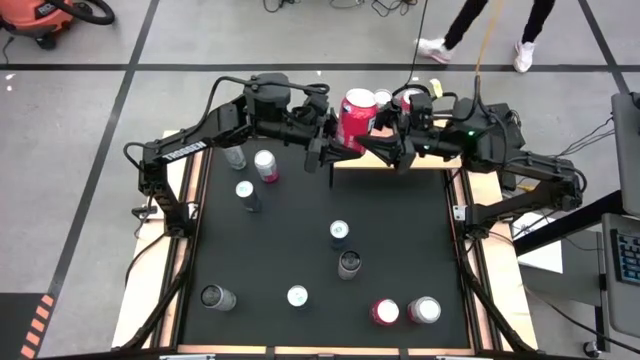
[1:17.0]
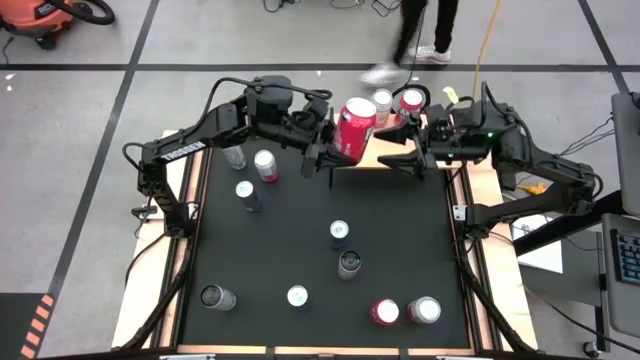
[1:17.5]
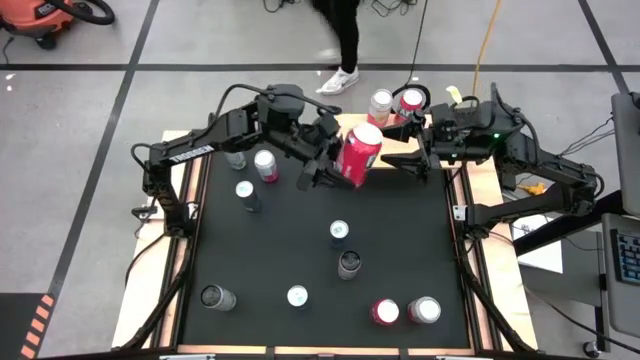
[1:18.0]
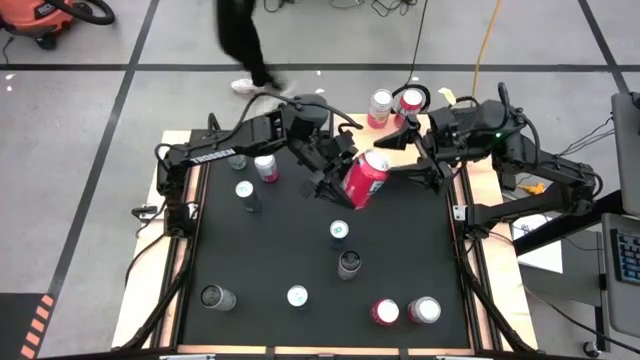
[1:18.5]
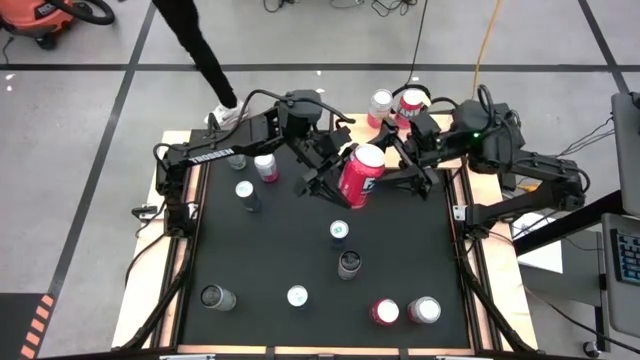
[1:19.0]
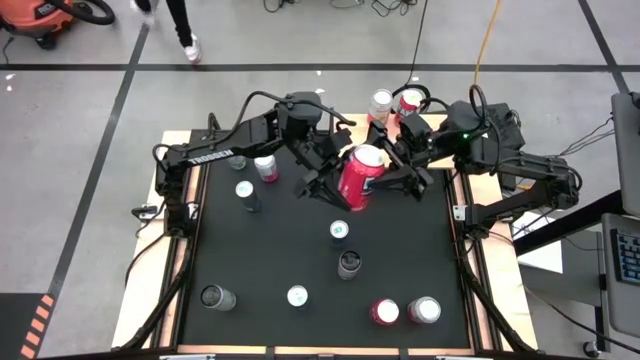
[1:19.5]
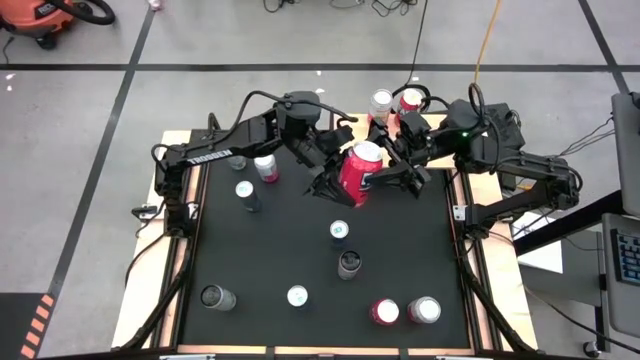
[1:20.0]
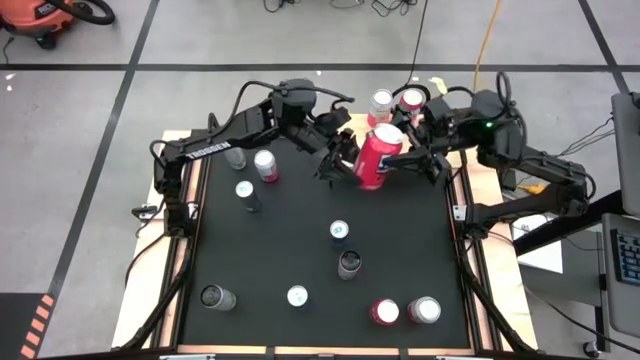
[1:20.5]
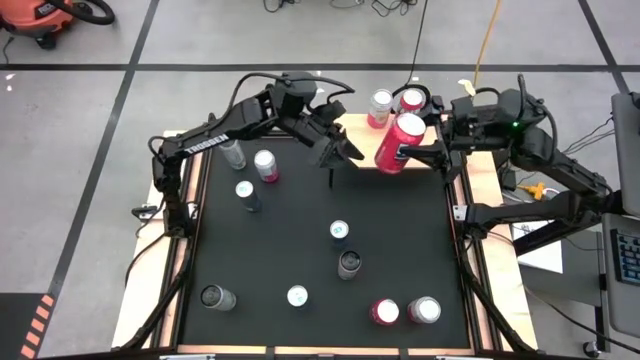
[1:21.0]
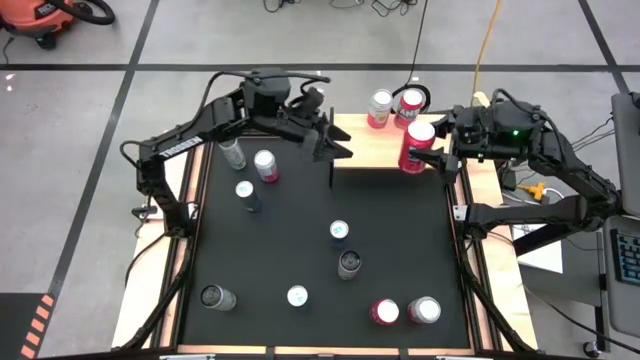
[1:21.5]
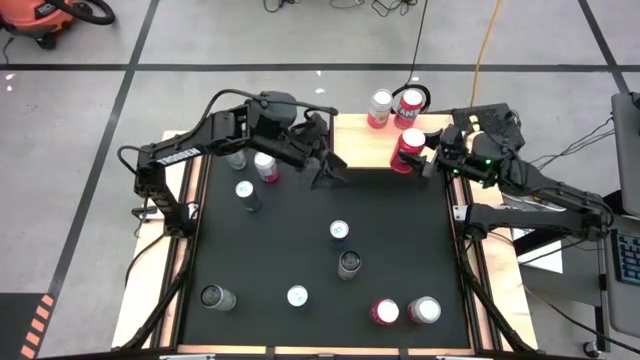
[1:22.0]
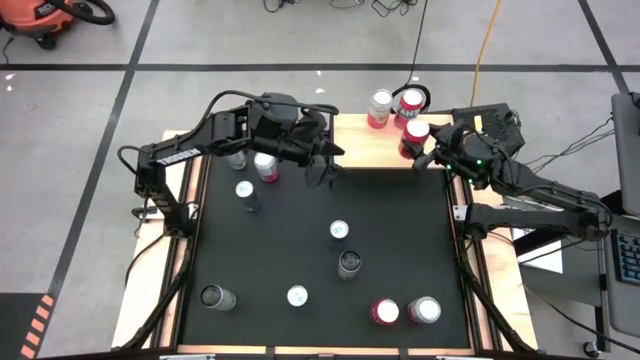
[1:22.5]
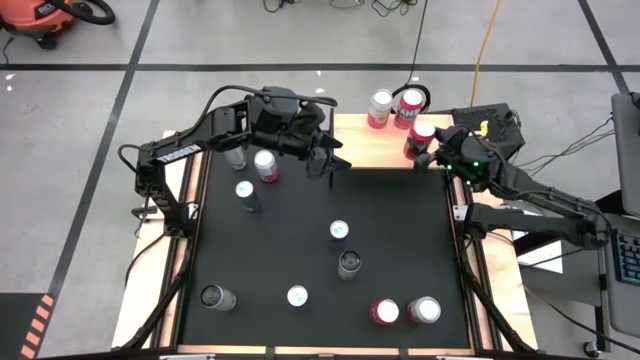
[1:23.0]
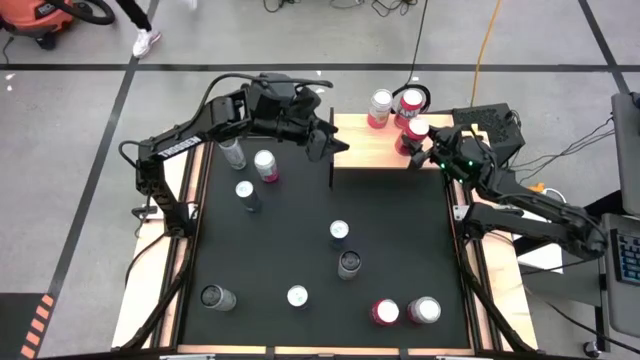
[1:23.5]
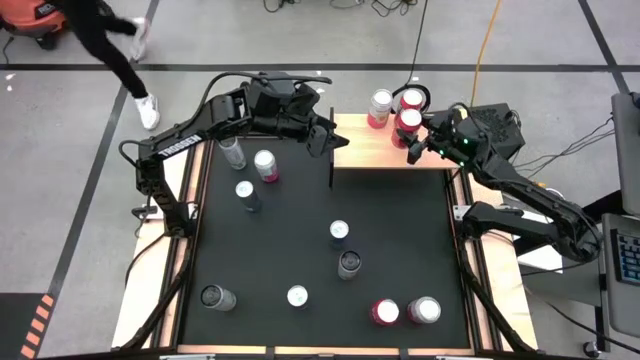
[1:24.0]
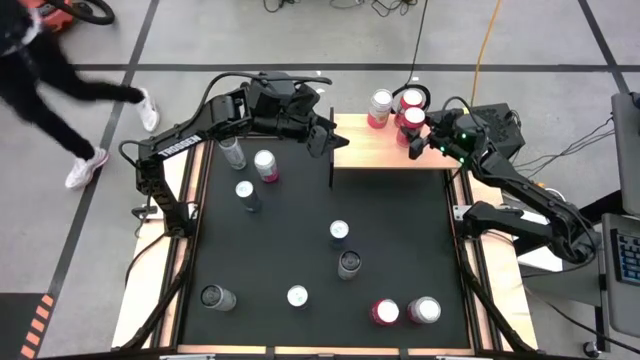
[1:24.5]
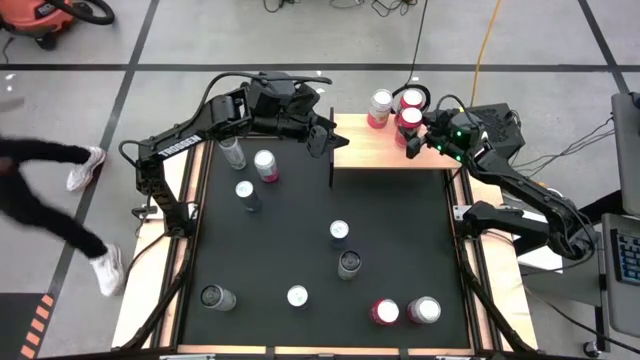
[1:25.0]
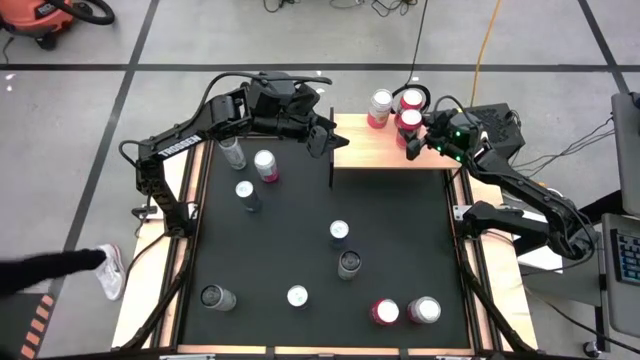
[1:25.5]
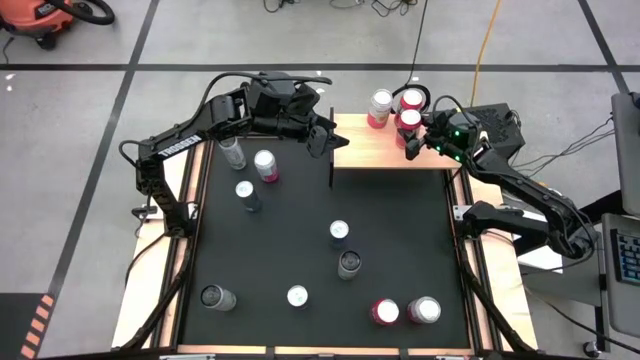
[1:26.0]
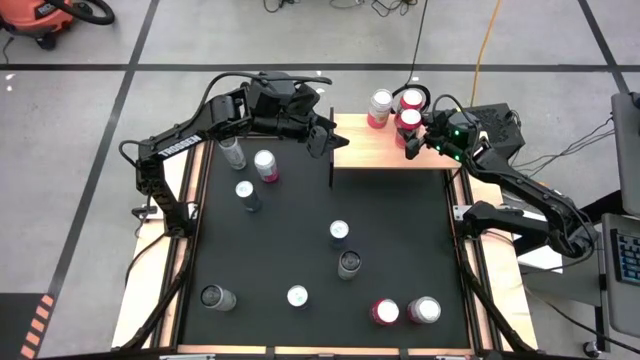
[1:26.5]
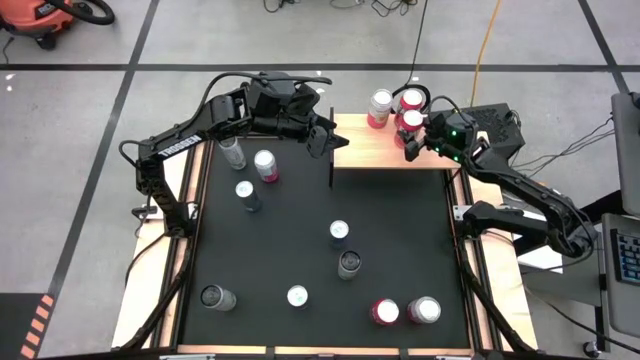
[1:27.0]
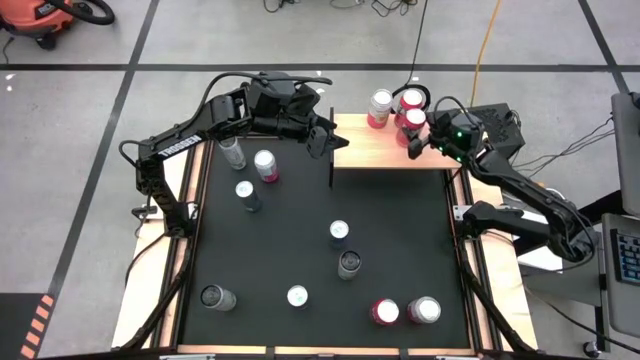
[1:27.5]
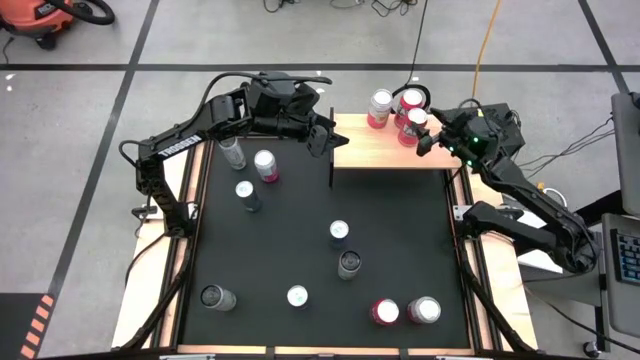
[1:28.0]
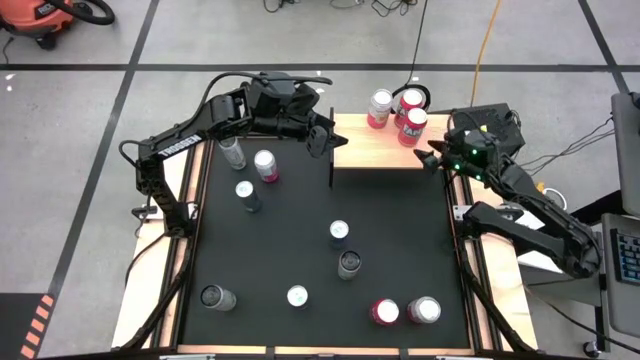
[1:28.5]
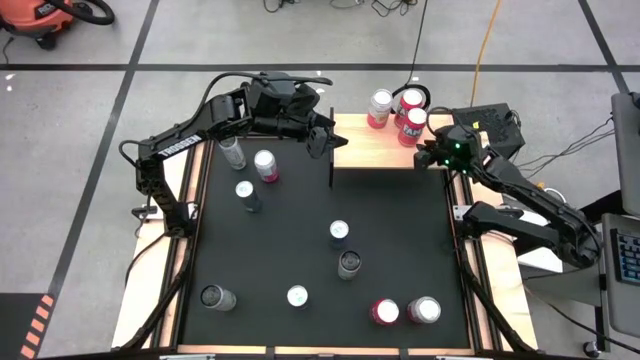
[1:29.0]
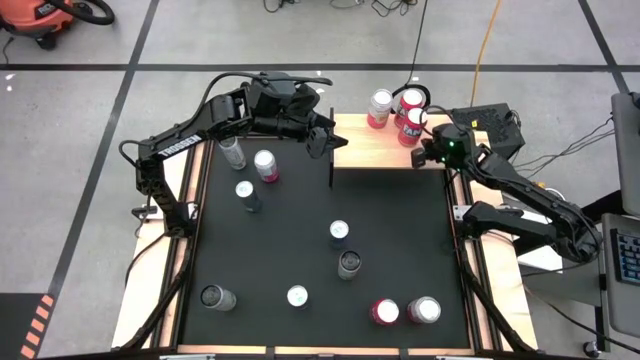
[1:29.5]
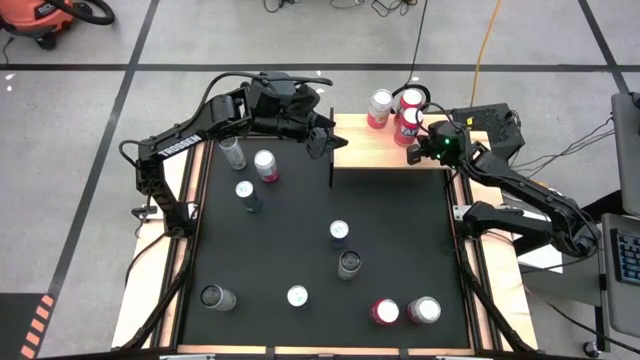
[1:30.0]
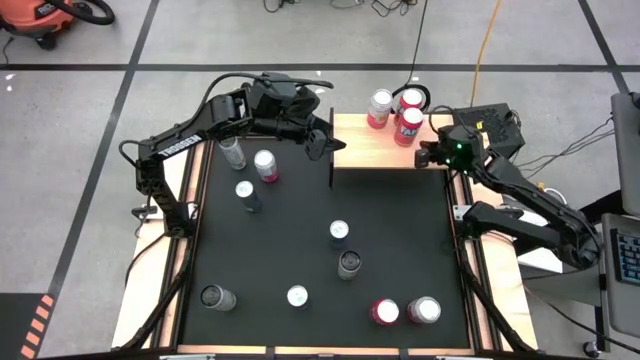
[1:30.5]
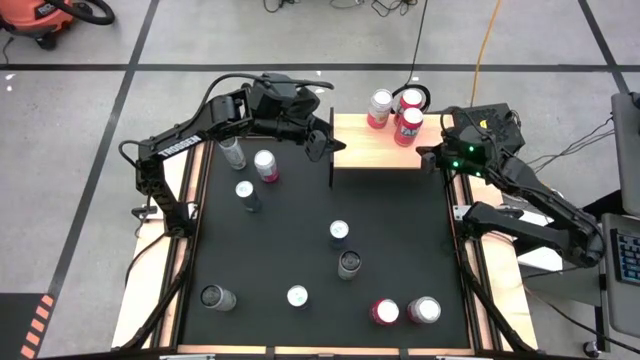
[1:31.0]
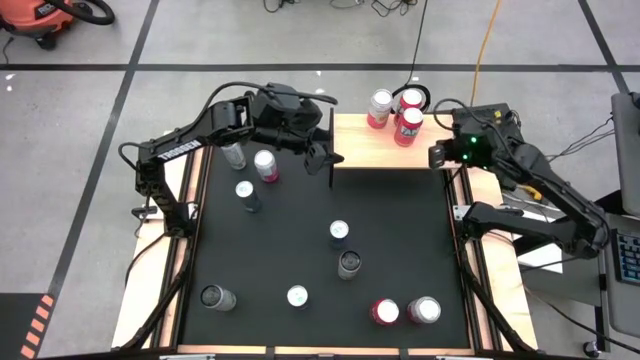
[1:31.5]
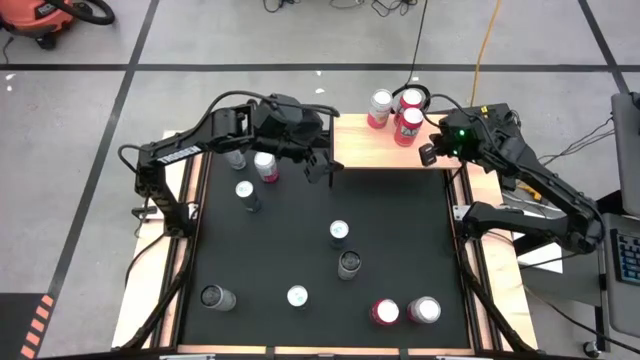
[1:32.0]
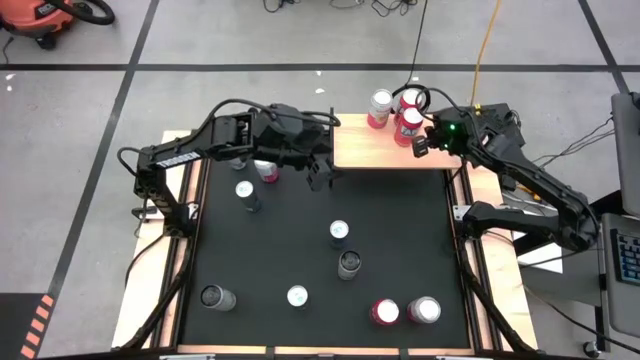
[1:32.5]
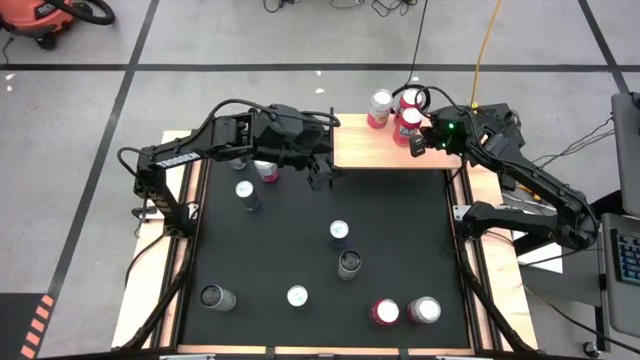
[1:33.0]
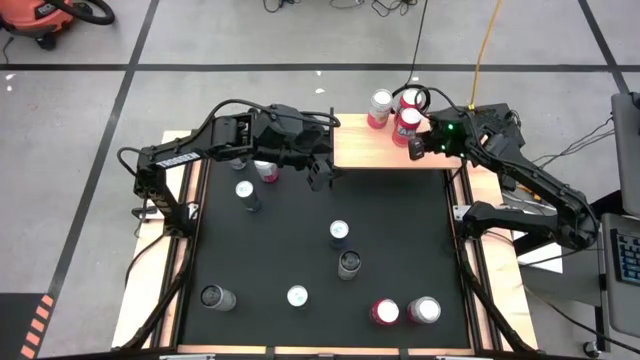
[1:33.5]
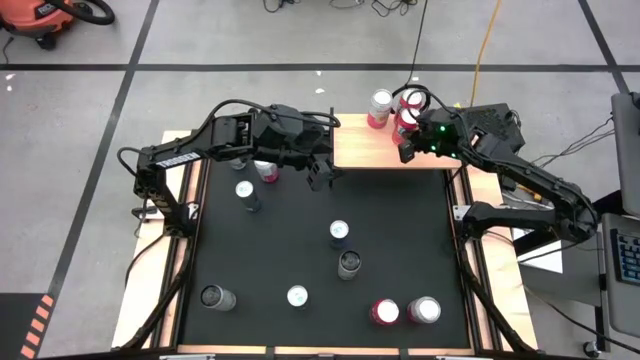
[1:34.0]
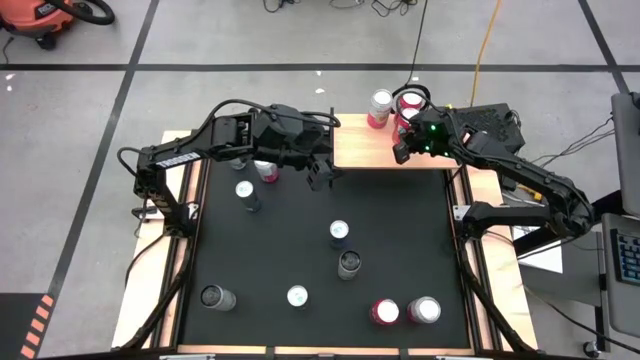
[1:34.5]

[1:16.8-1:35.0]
Task: Place canned beverage on shelf
Put the top red soda can on the shelf aligned with the other red soda can

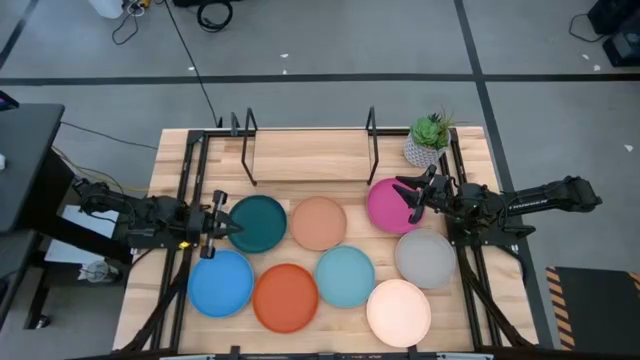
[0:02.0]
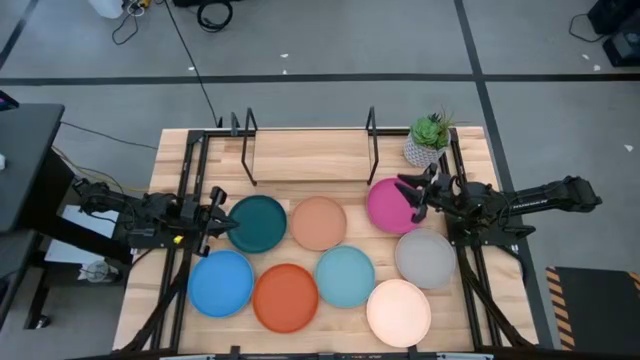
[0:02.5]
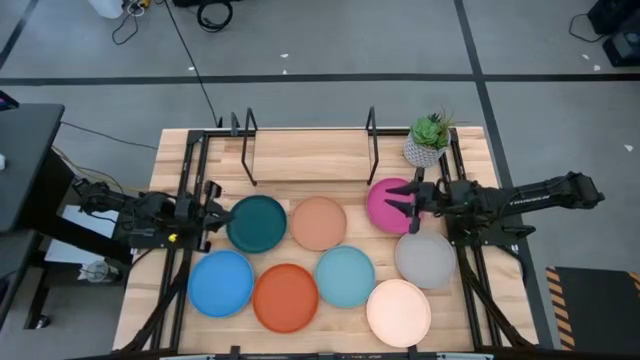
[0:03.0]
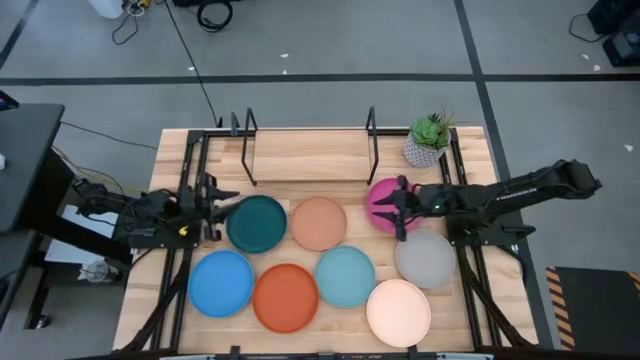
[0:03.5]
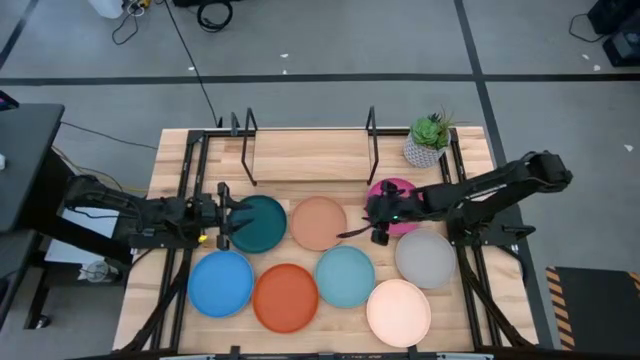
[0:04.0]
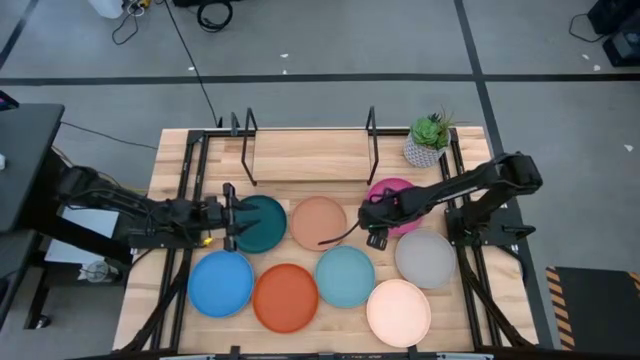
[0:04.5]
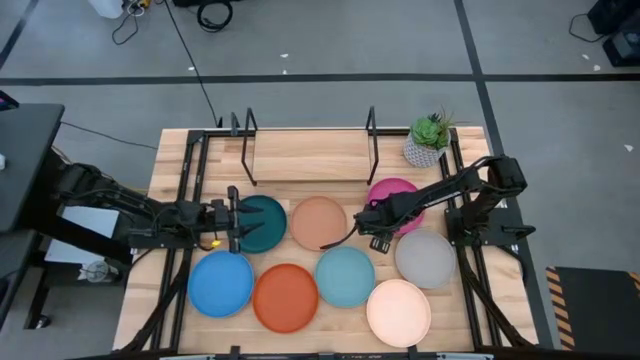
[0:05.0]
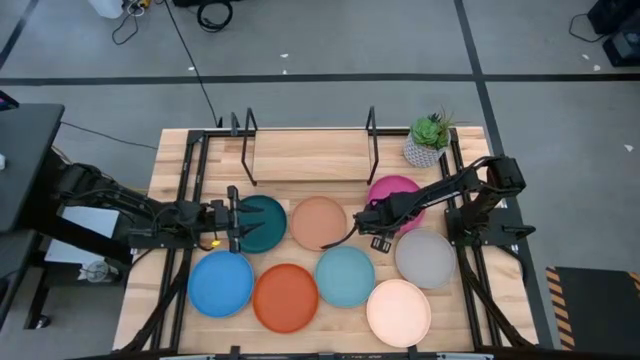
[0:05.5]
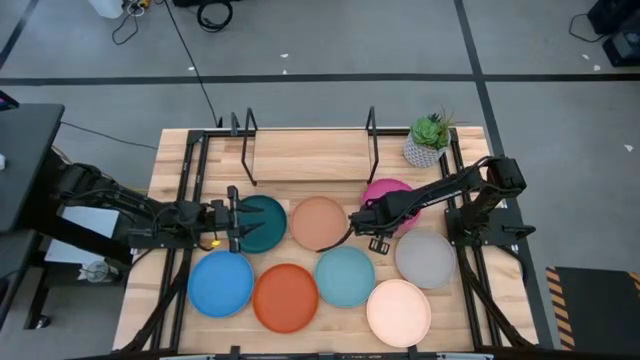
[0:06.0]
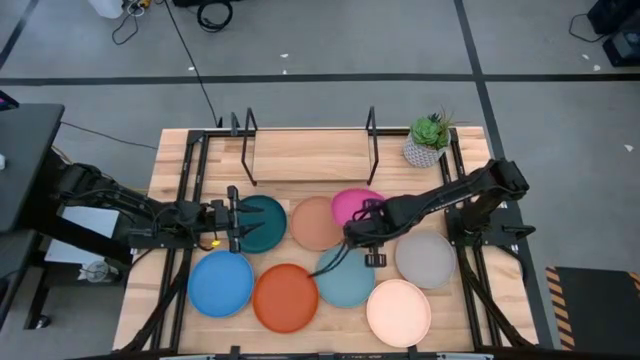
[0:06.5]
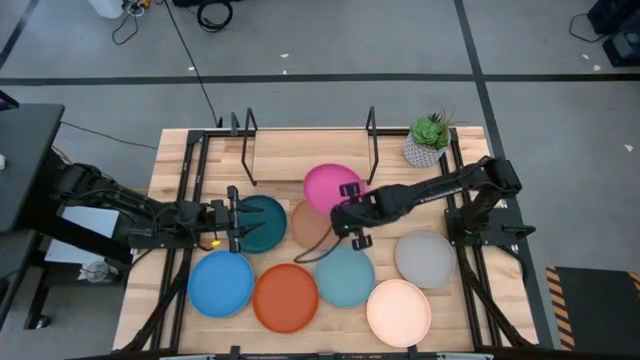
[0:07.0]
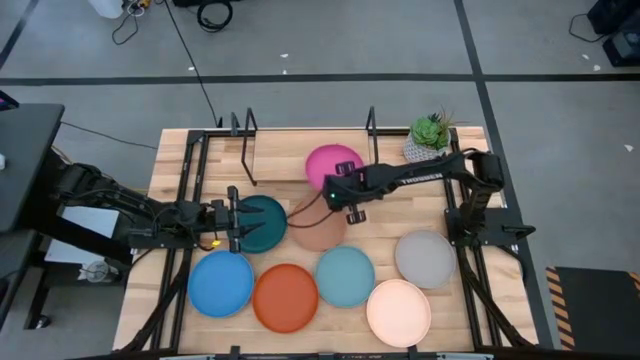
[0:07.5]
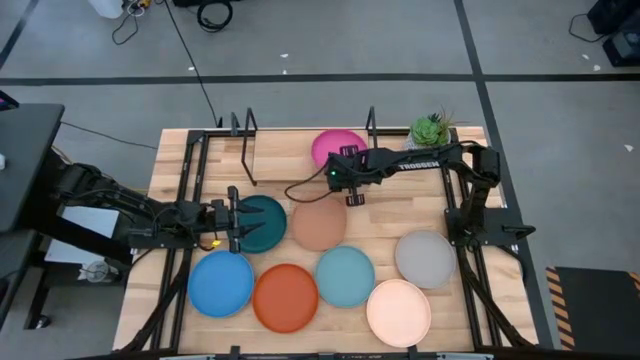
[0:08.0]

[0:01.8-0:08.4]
Task: Place and stack plates onto a shelf
Put the pink plate on the shelf
